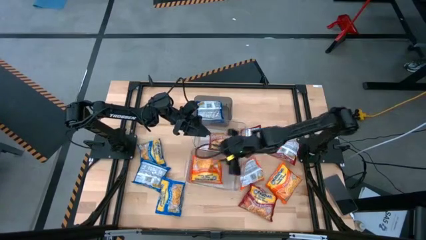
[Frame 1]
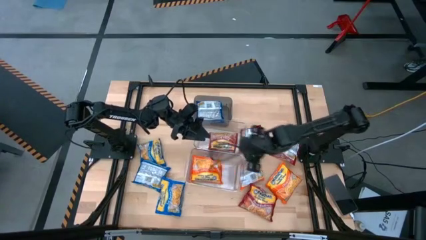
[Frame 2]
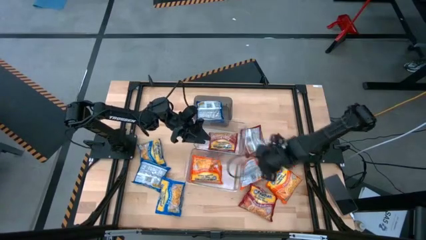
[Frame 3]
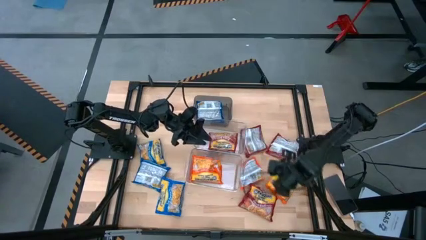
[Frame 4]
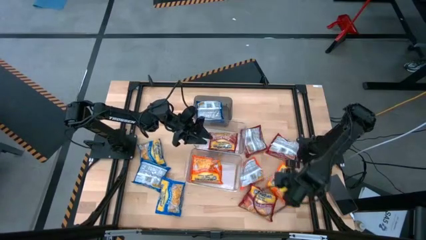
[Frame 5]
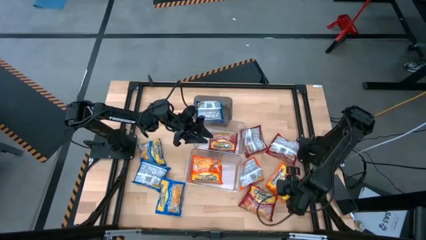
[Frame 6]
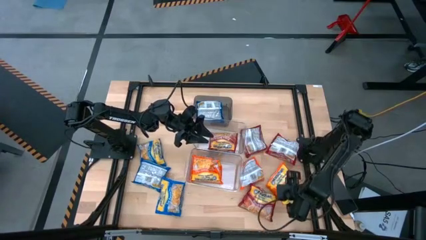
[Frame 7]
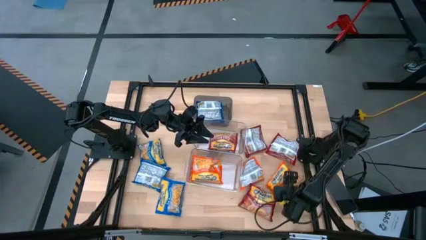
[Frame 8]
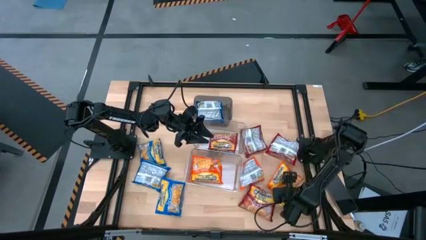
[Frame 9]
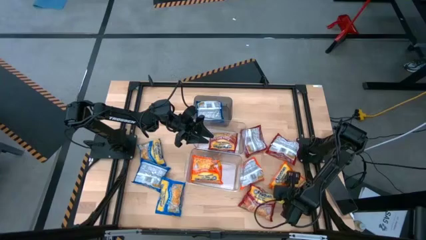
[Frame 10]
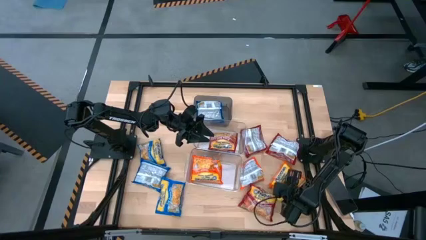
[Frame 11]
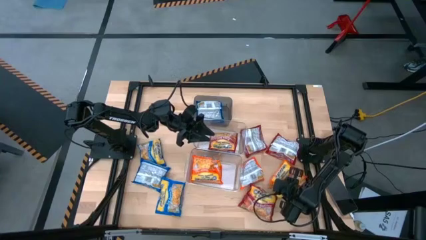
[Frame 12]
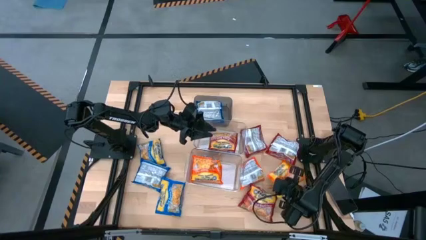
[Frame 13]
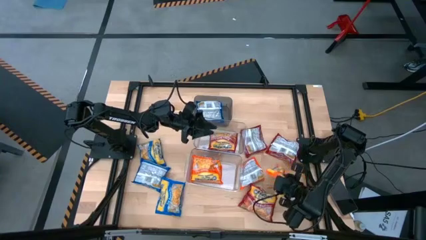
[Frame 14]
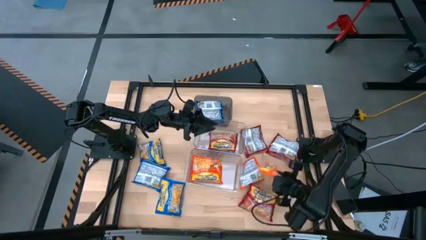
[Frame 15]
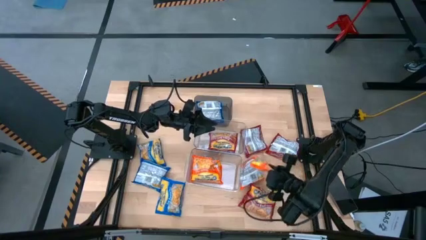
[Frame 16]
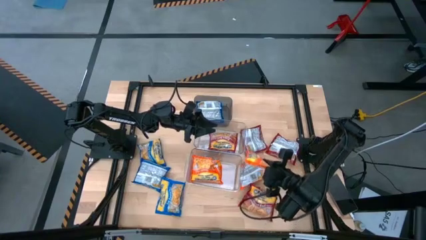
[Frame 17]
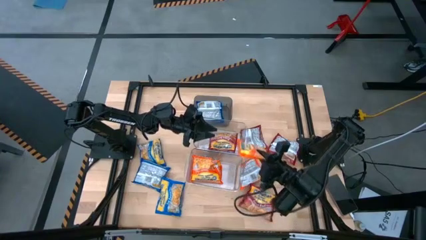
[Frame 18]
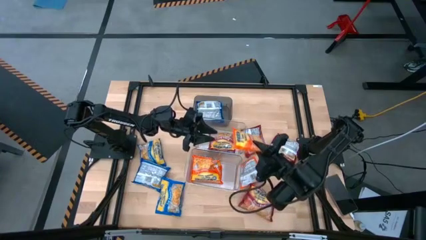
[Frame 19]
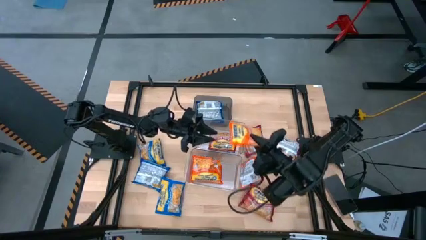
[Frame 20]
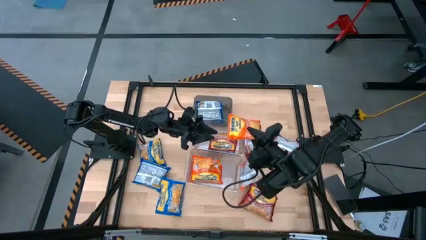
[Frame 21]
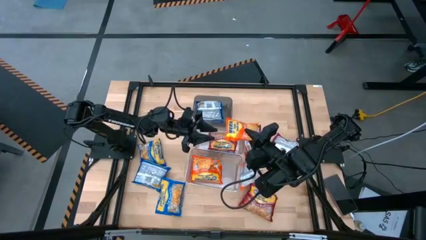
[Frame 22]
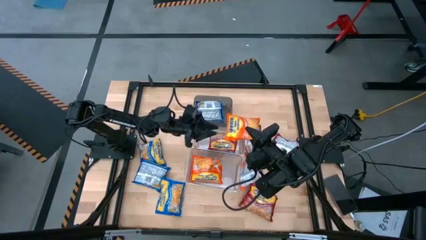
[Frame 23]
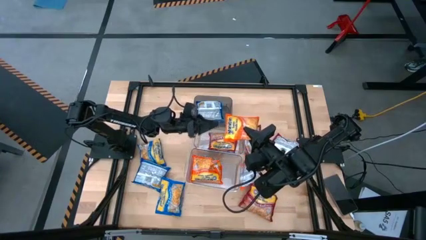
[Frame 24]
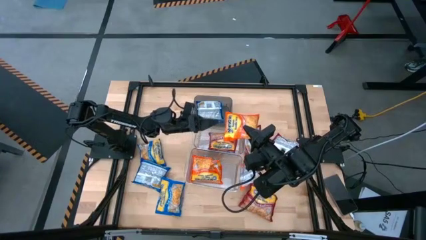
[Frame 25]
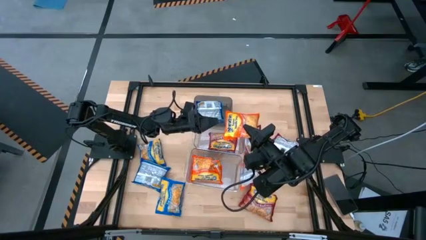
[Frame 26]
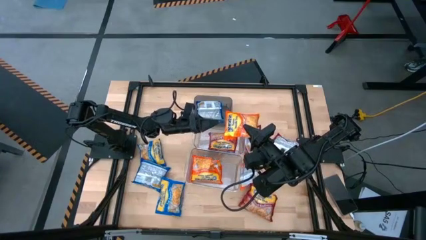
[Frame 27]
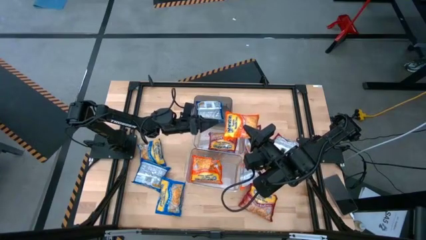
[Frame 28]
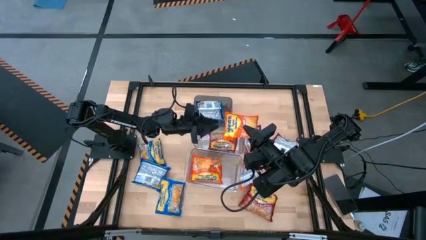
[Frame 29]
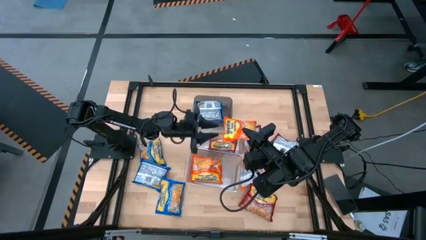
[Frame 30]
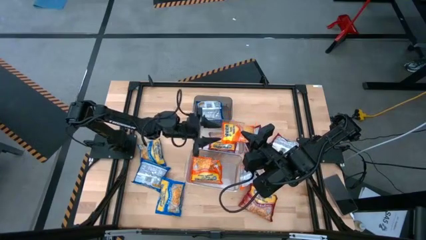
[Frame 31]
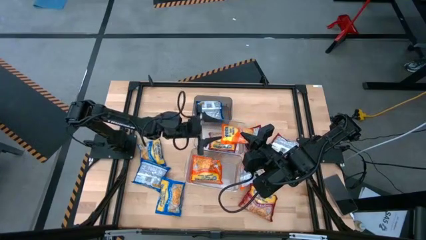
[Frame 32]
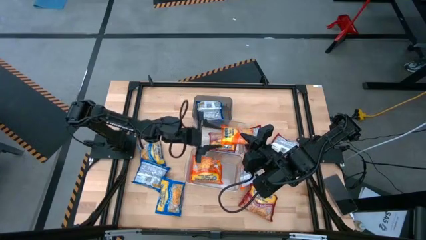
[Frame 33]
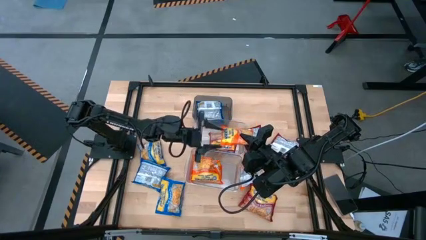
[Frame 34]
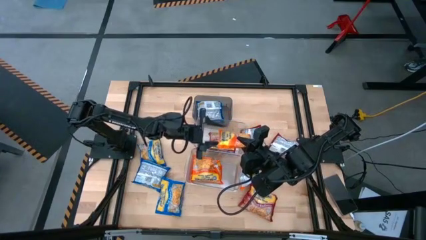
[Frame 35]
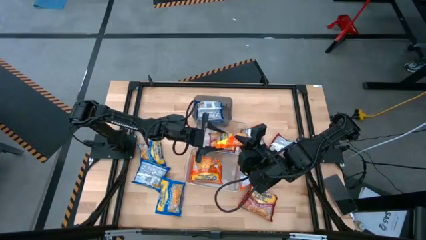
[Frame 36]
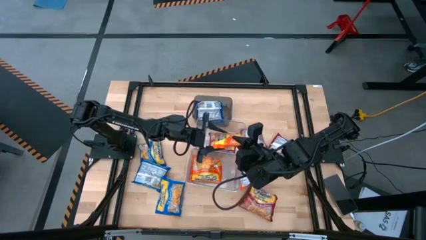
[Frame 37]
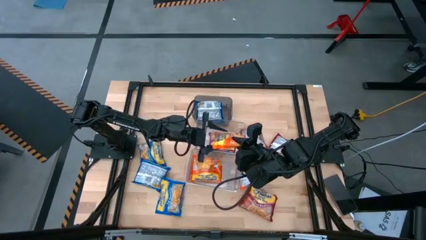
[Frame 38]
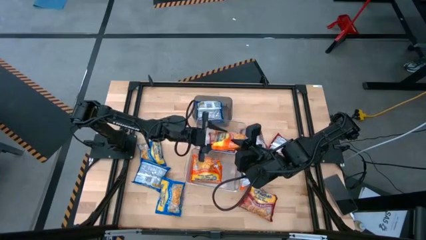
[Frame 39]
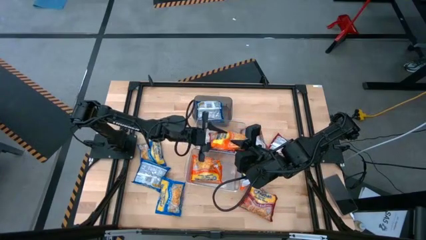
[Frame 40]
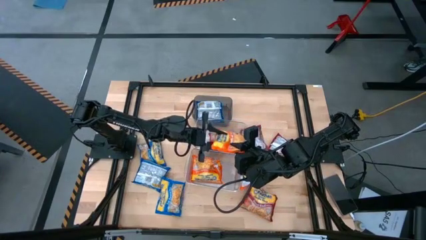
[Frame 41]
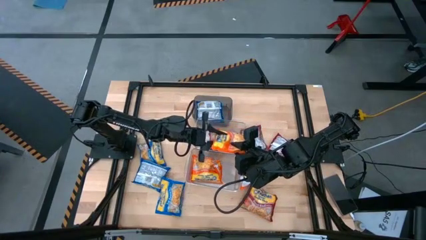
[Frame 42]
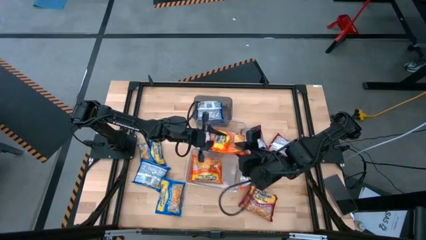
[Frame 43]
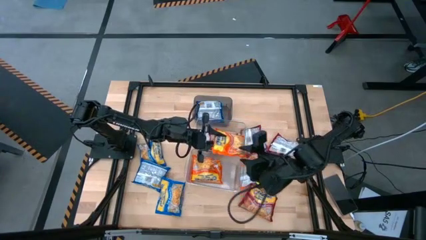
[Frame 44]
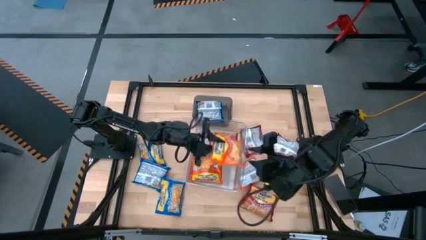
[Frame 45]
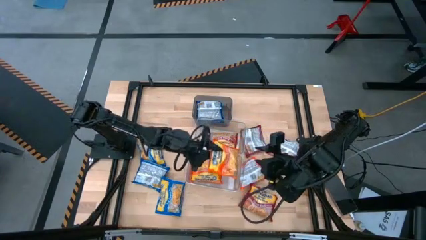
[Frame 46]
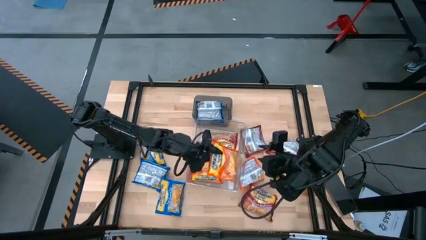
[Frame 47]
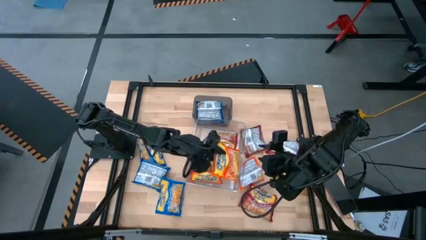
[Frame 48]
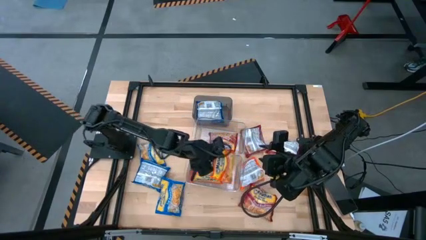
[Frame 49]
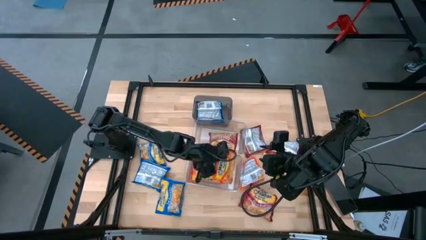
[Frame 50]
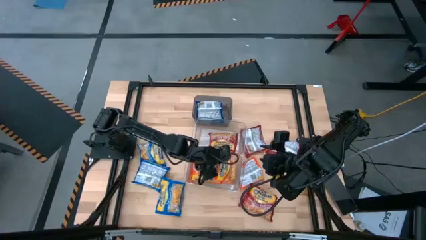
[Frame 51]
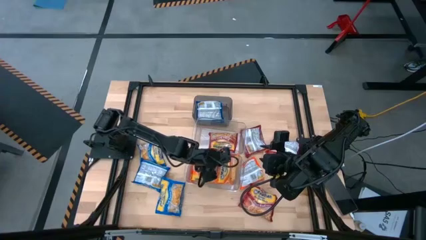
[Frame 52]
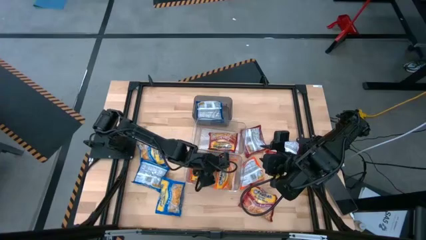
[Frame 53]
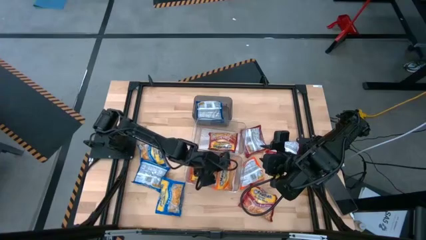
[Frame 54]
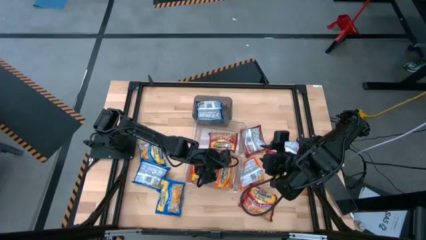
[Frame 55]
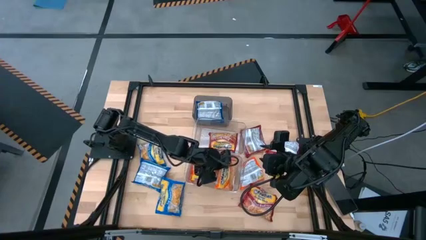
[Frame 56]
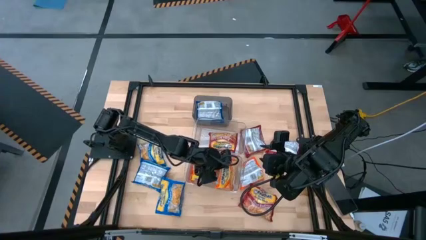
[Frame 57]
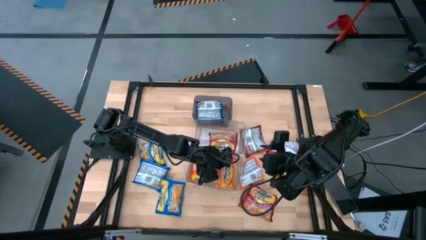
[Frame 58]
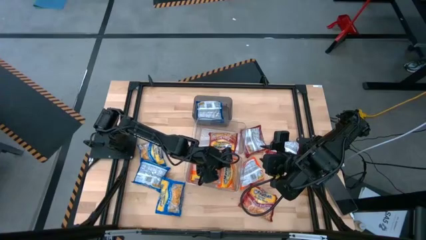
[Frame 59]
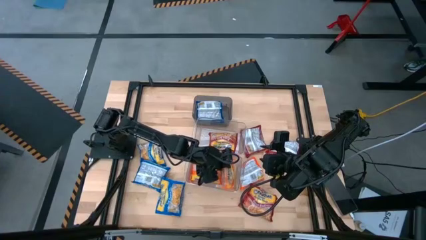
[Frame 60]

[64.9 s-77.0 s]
Task: Sort Maruchan noodles
Put the right orange noodle pack into the bottom transparent bin
